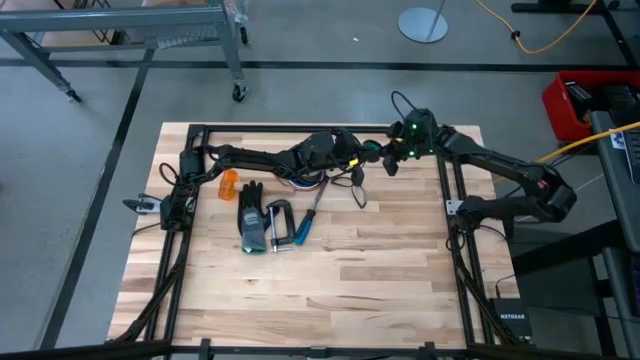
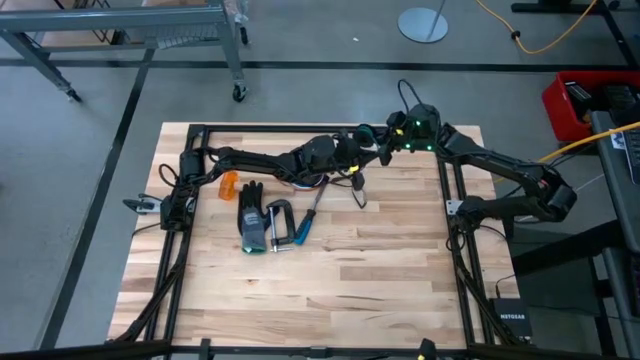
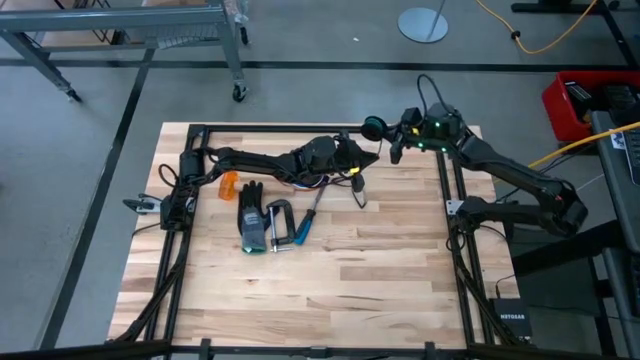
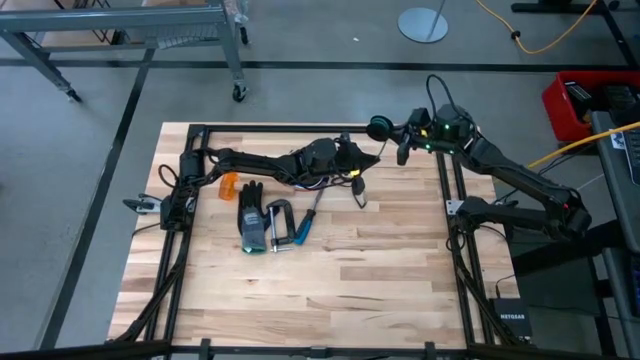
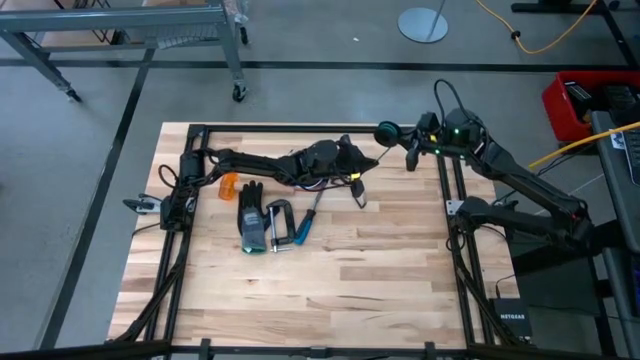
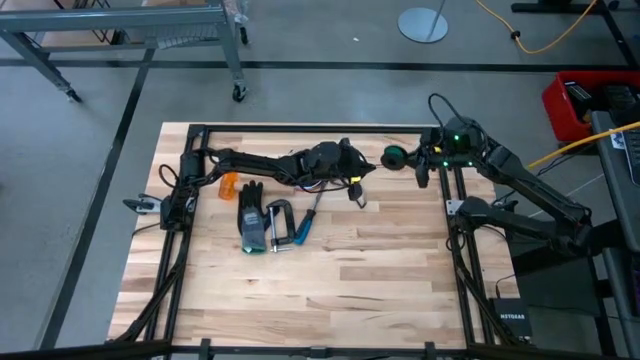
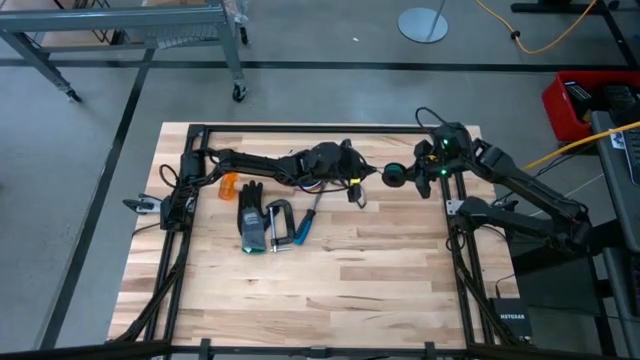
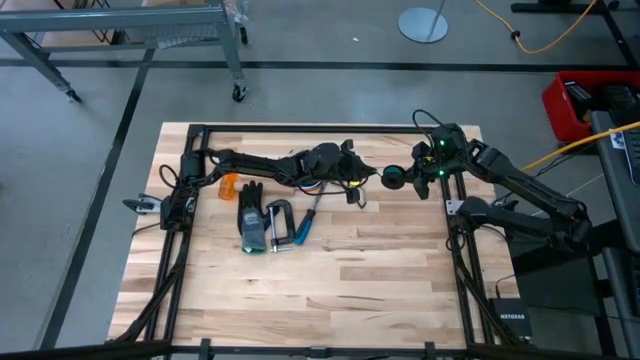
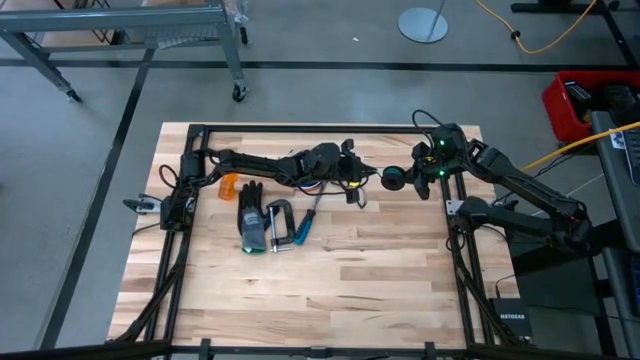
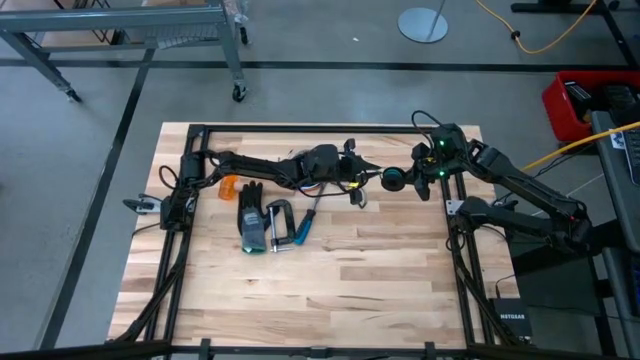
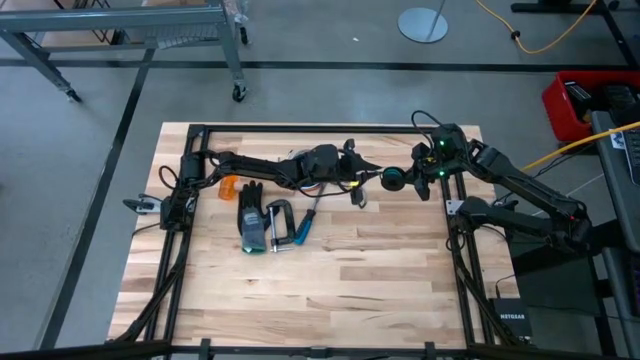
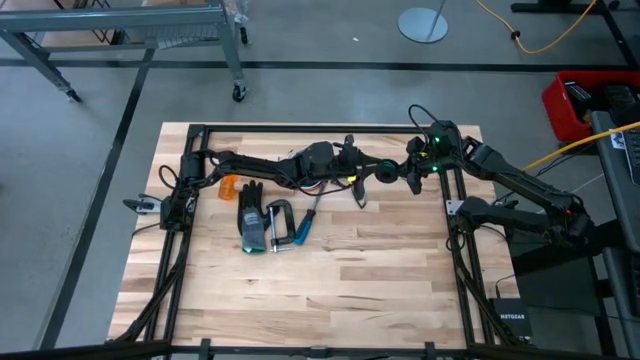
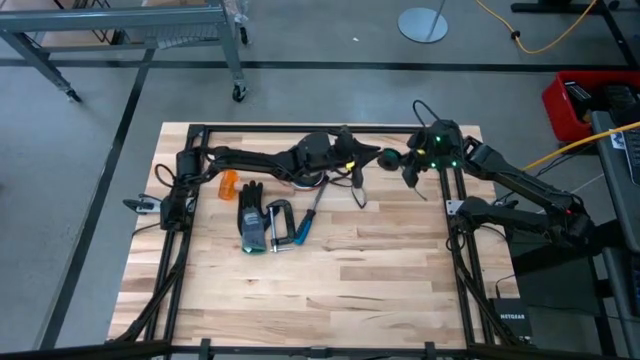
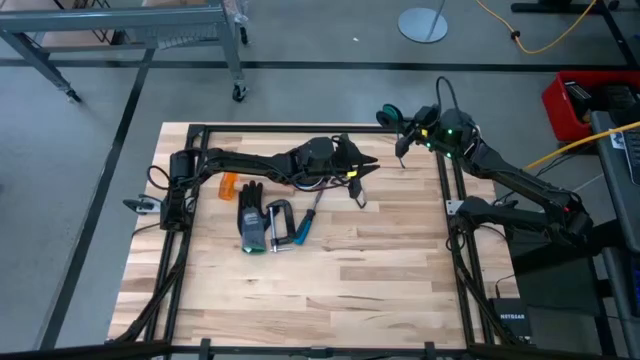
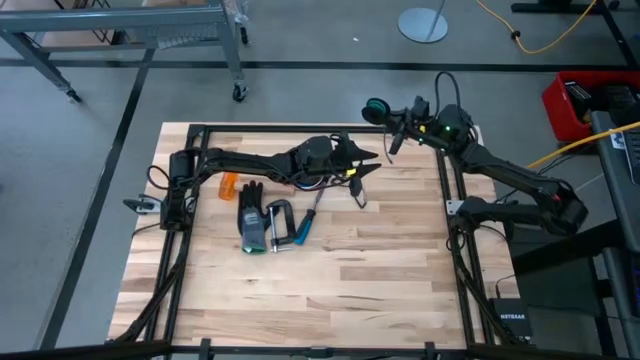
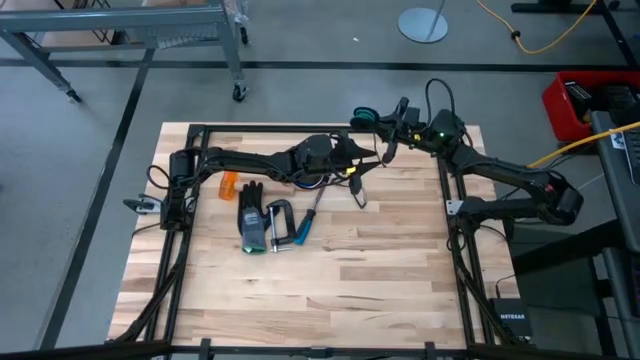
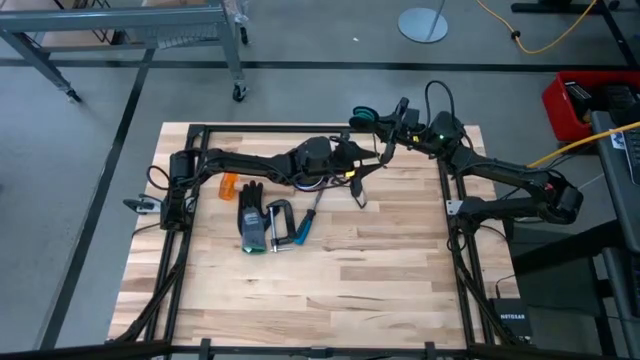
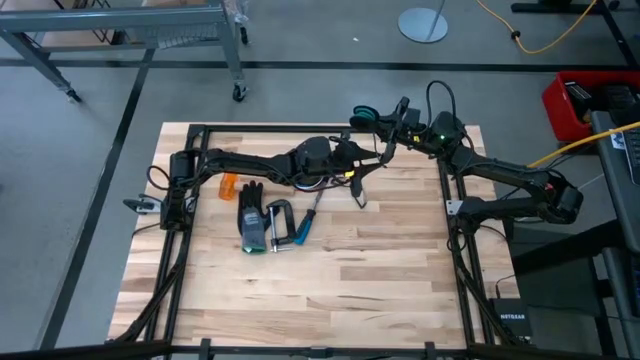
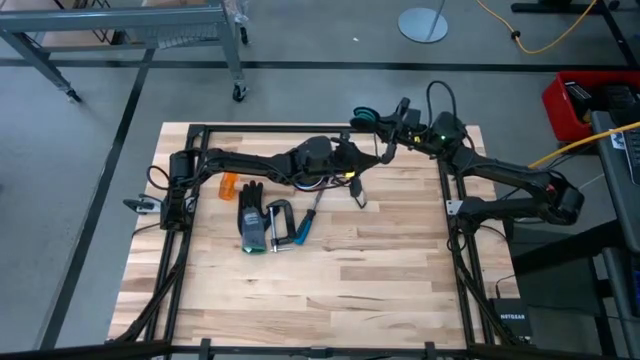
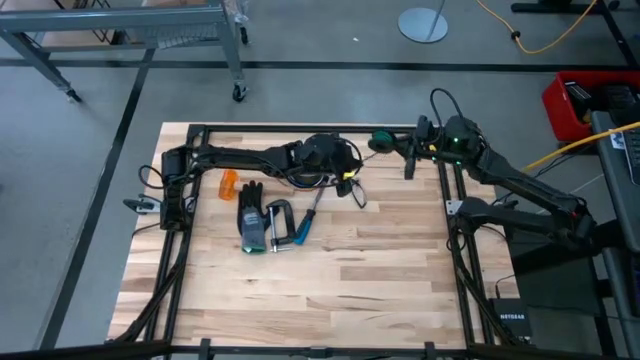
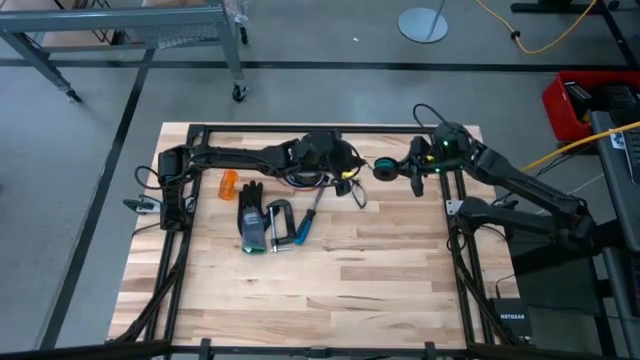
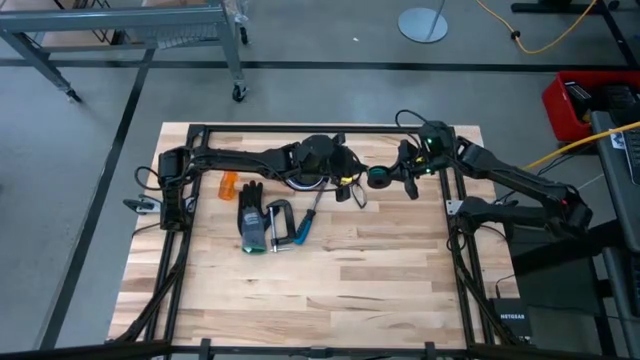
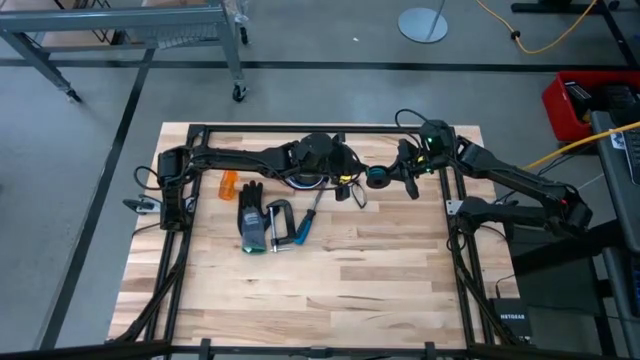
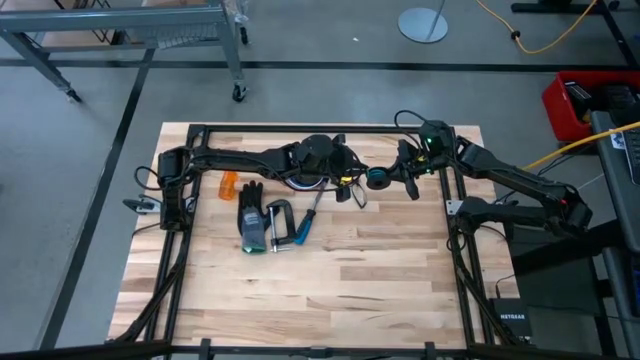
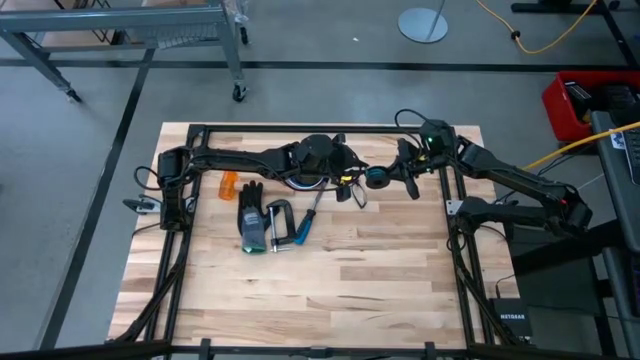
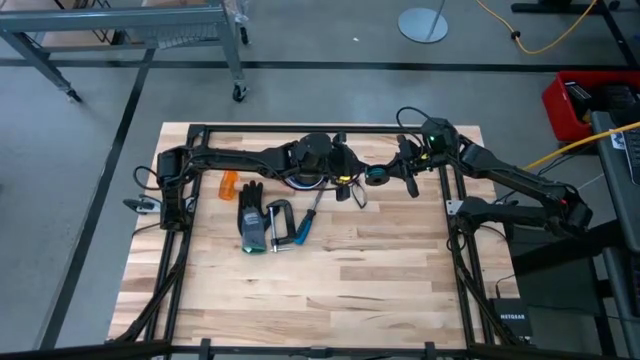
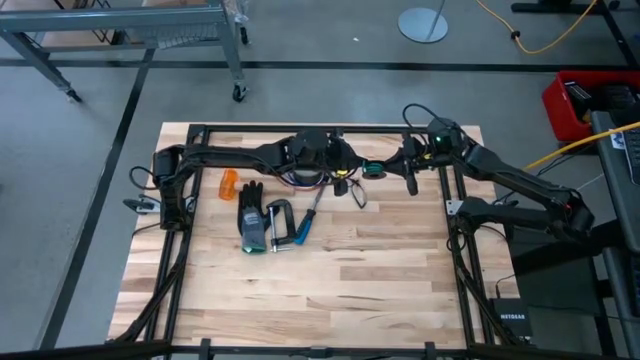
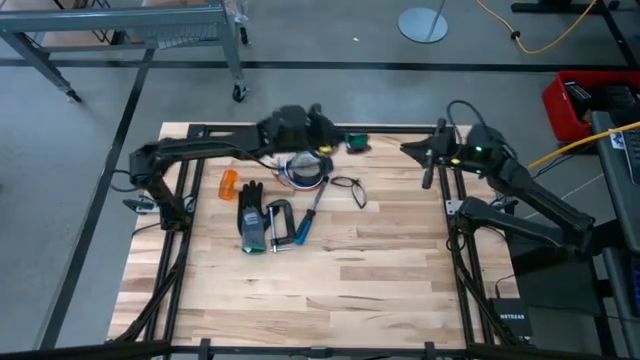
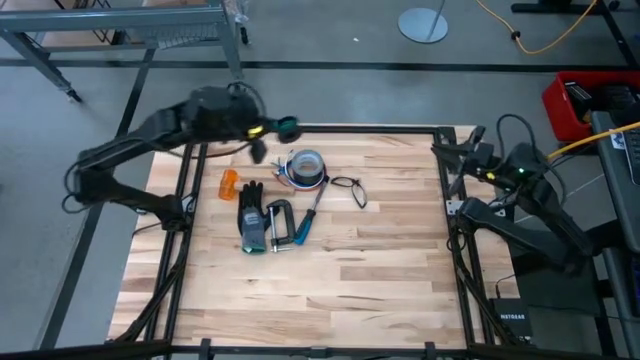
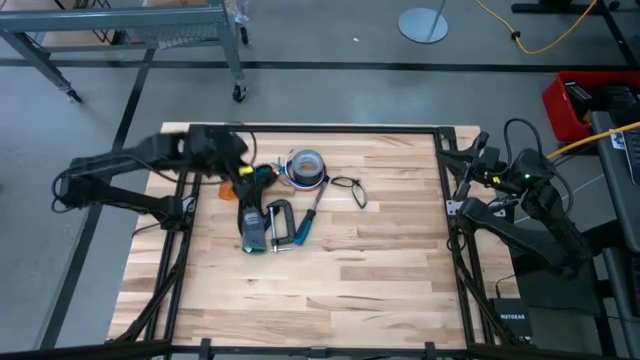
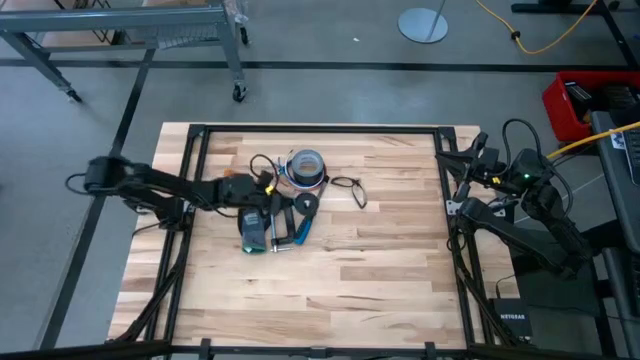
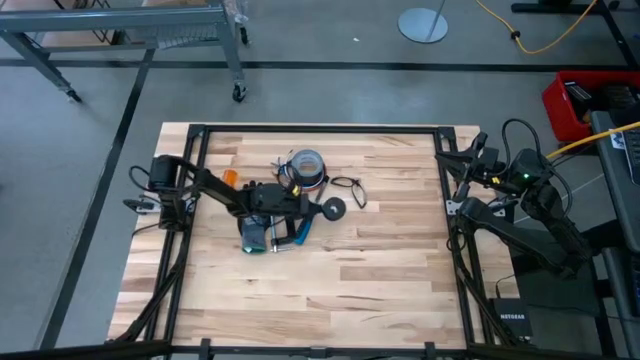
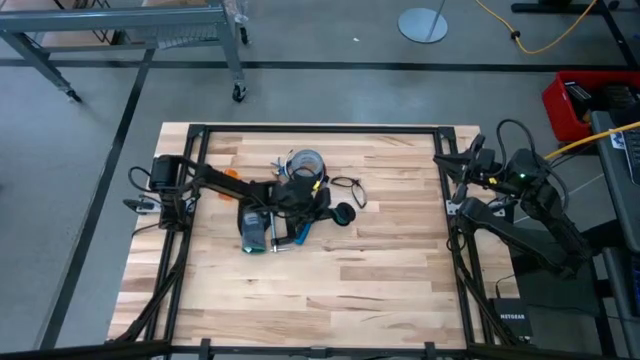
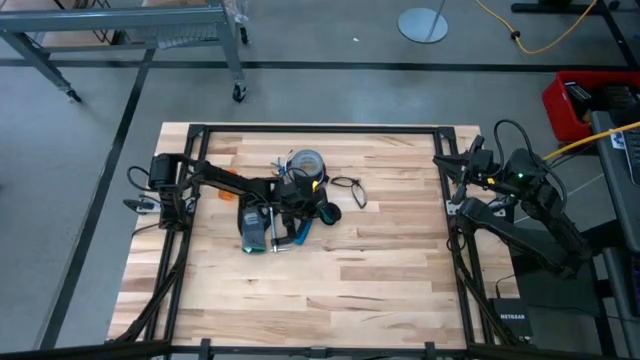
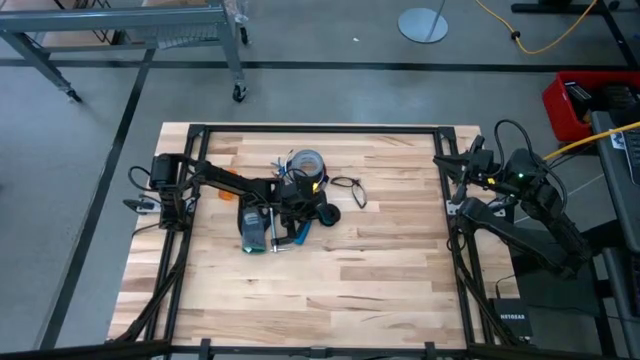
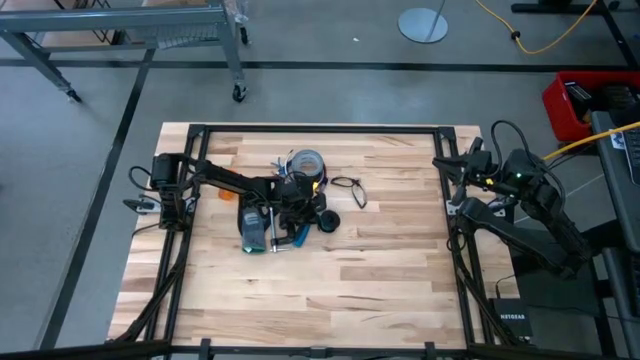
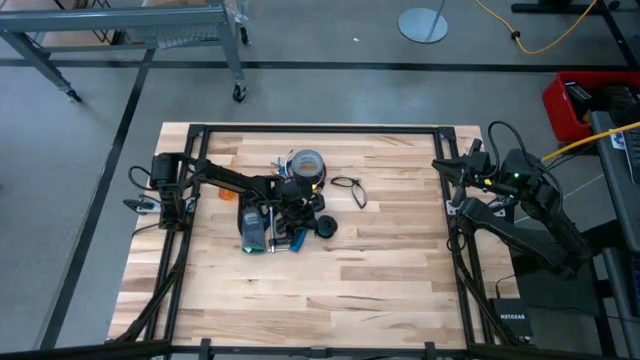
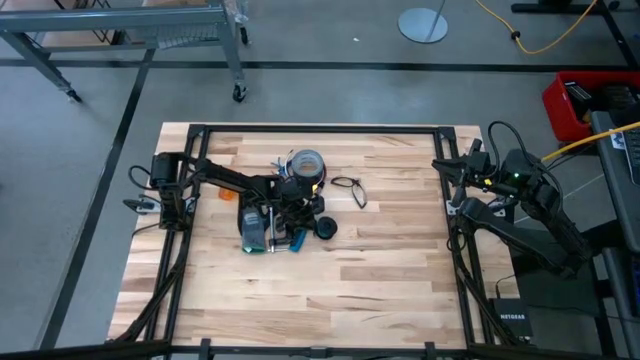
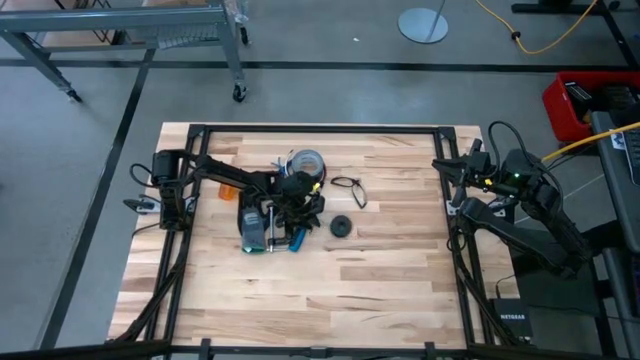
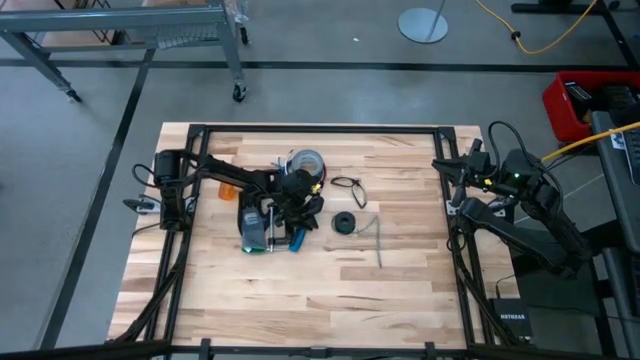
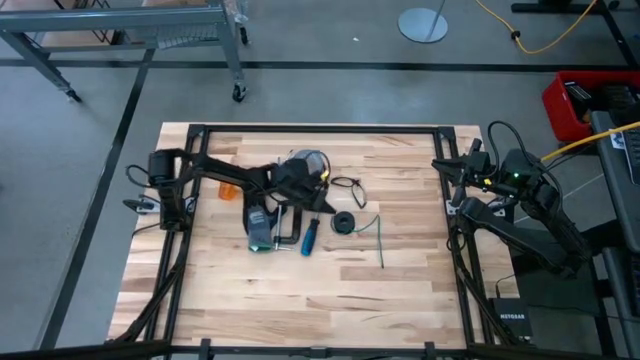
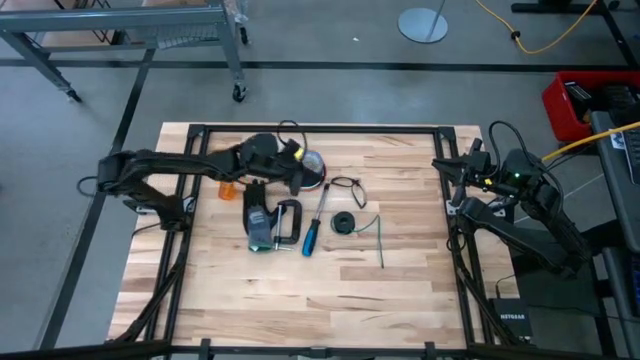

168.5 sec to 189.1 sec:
Task: Coil cords
Coil the wire in the cable spool
